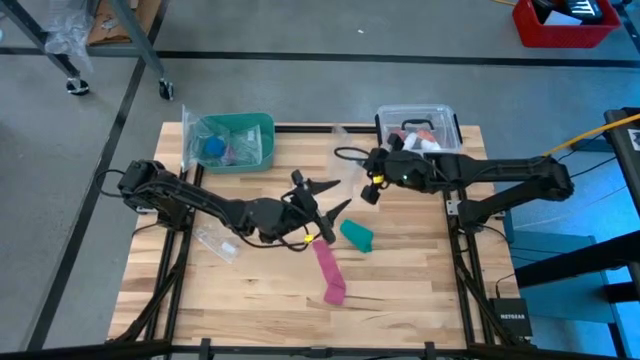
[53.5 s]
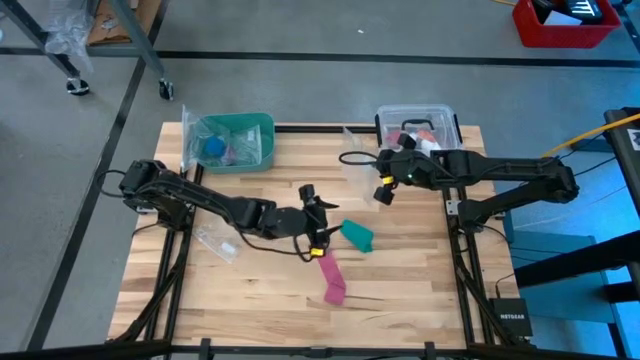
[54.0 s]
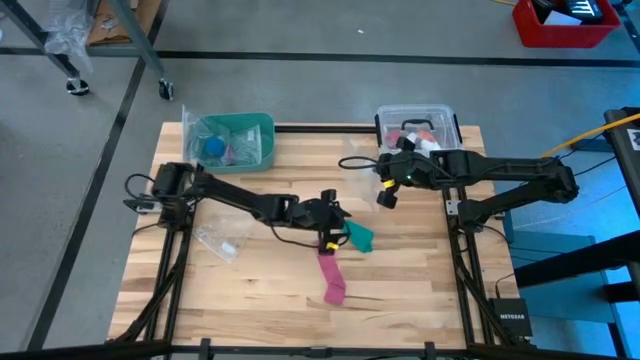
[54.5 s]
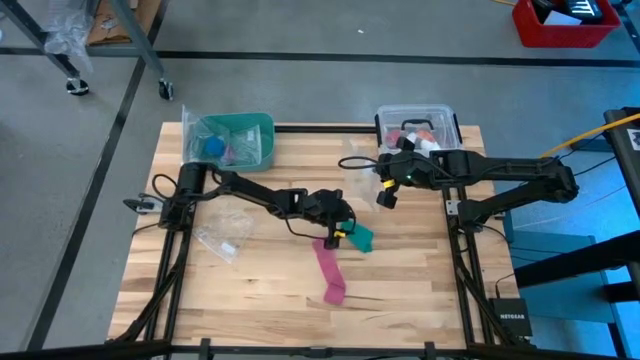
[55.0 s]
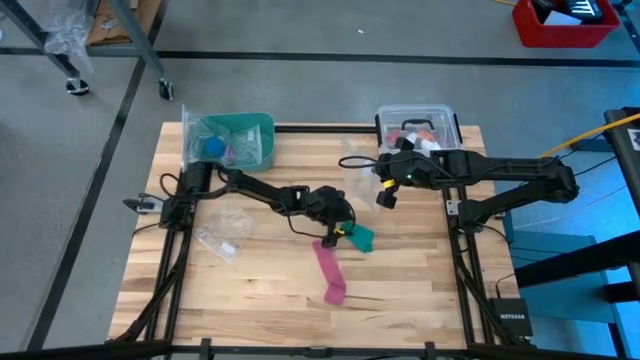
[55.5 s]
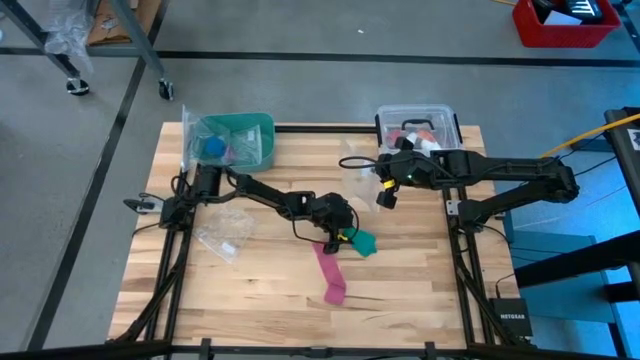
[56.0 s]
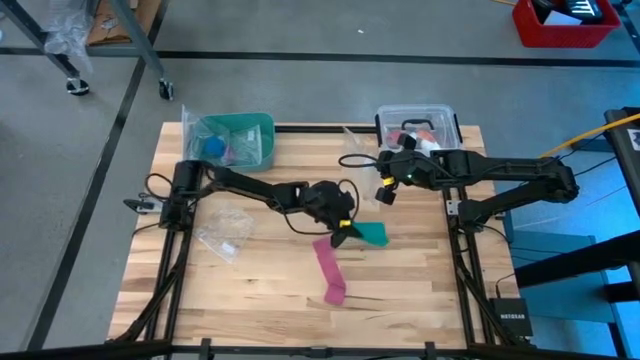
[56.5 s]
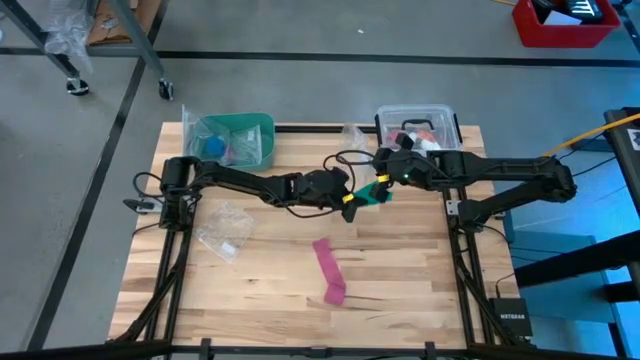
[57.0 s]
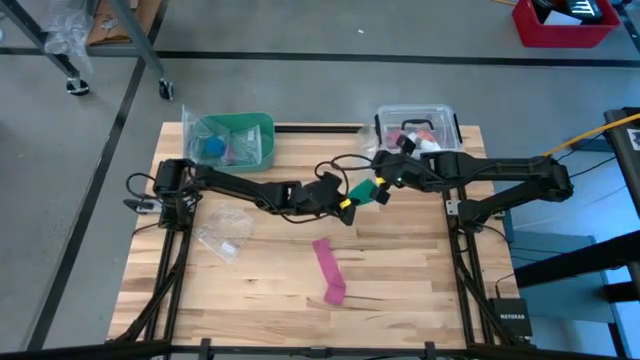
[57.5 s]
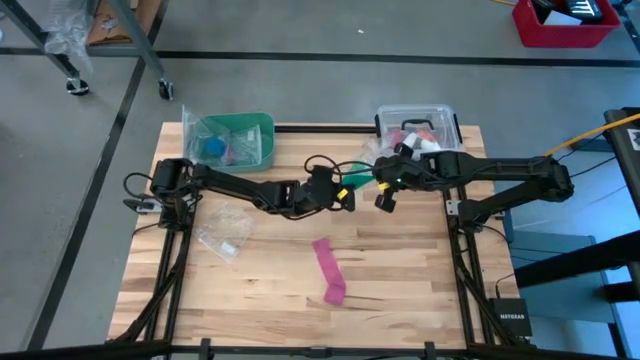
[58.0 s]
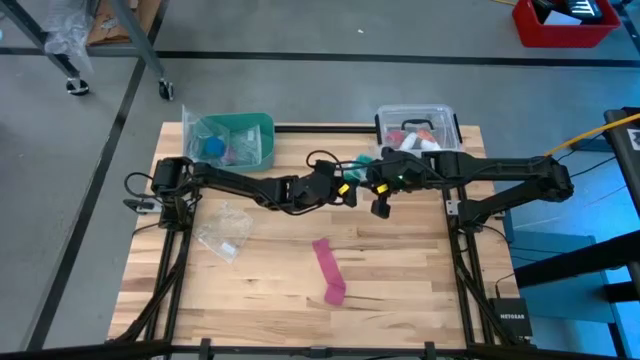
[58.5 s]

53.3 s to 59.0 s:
Task: Roll bandage
Put the green bandage into the transparent zip bag

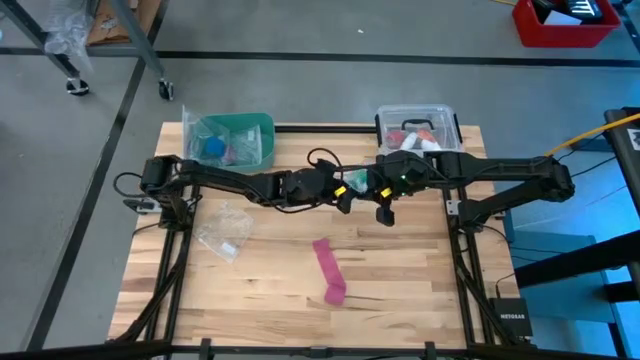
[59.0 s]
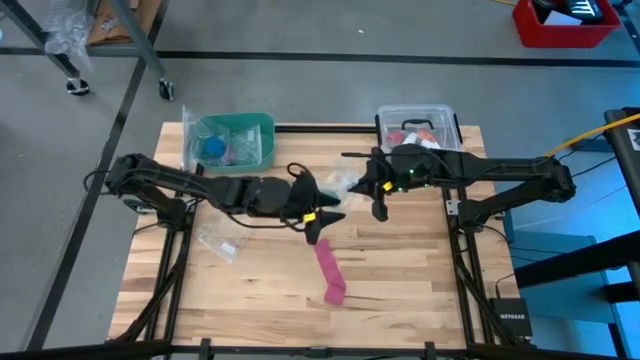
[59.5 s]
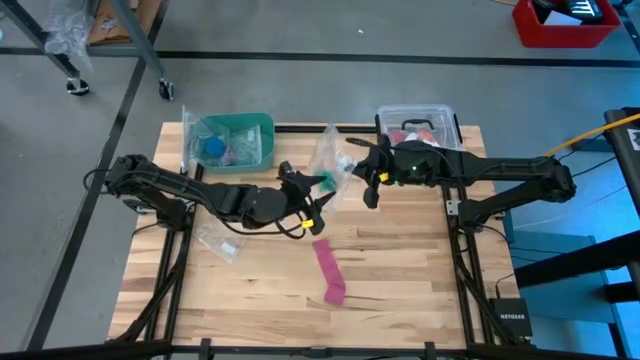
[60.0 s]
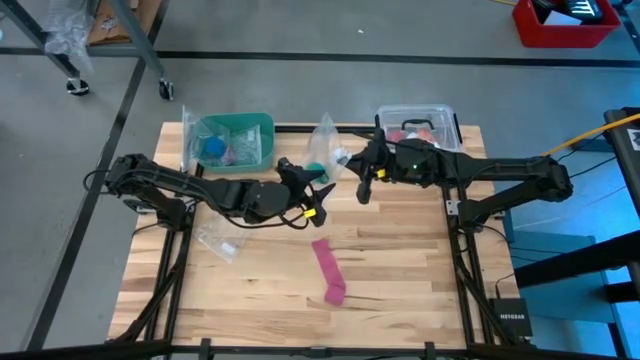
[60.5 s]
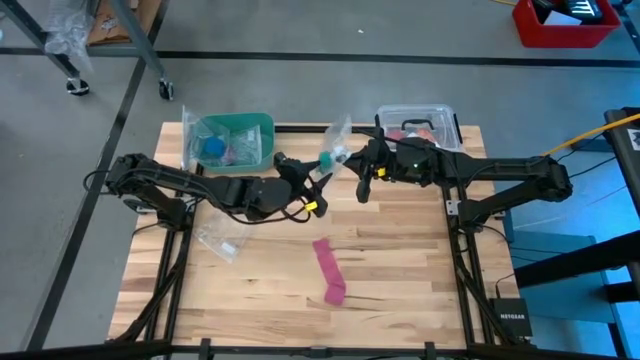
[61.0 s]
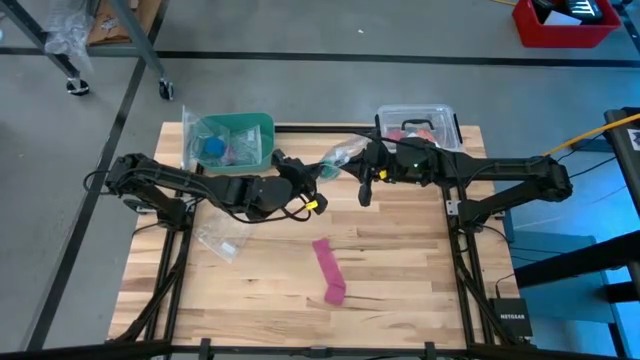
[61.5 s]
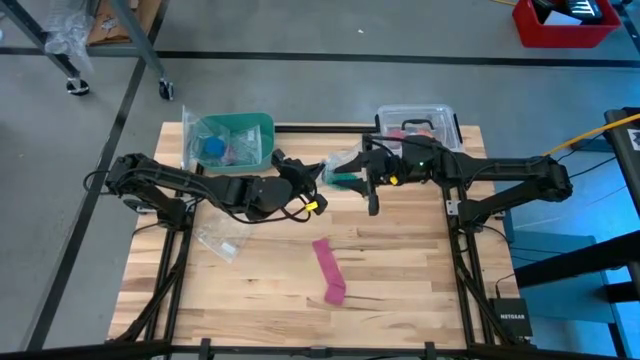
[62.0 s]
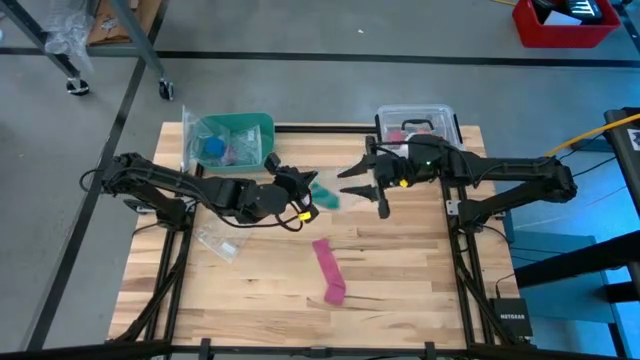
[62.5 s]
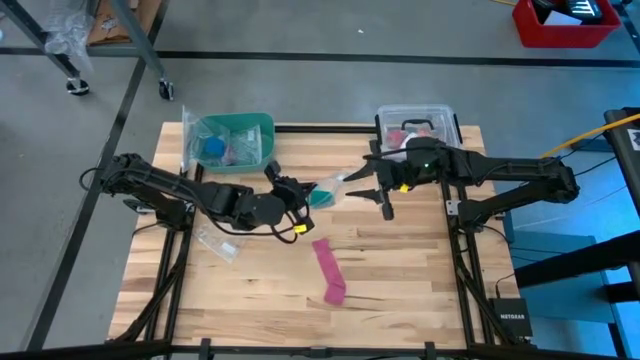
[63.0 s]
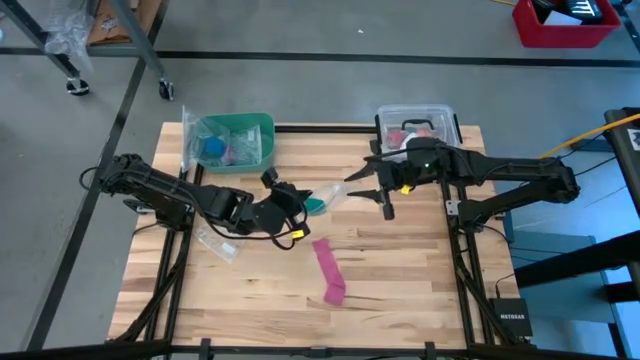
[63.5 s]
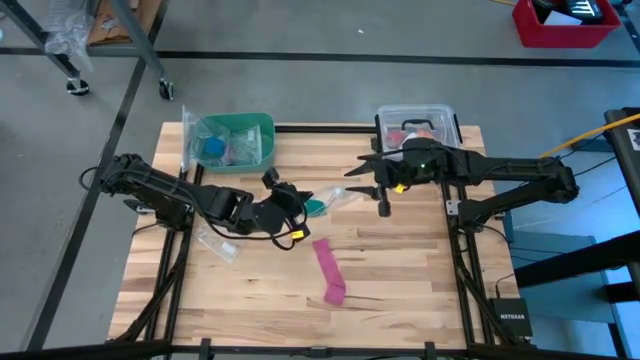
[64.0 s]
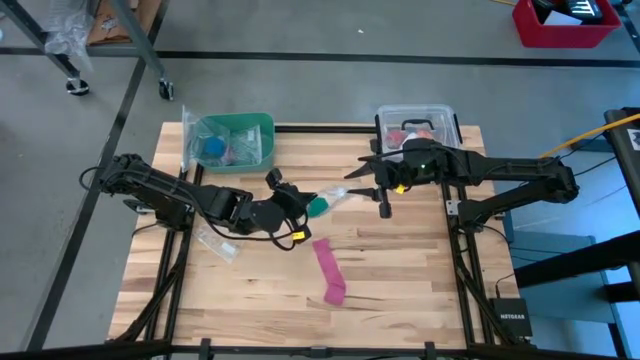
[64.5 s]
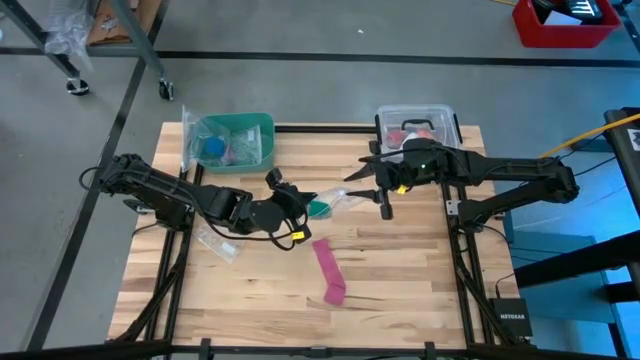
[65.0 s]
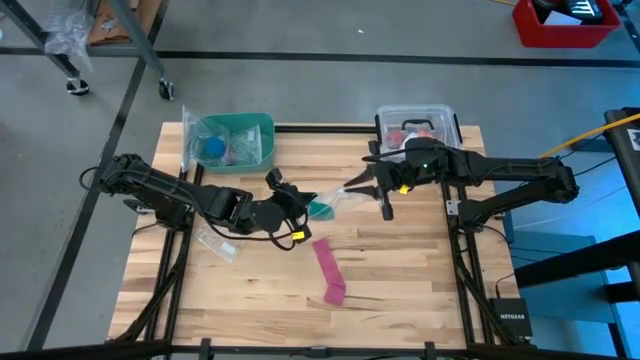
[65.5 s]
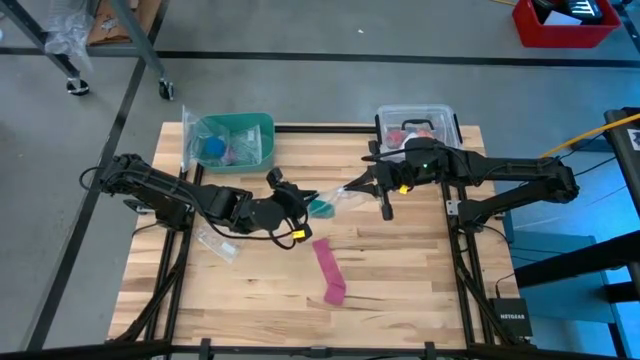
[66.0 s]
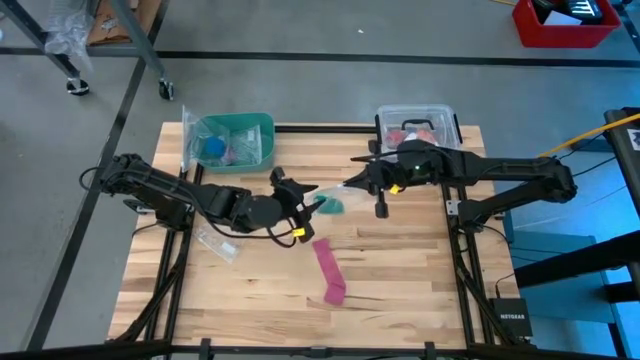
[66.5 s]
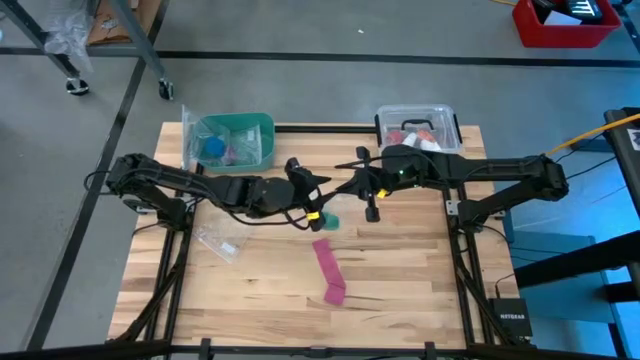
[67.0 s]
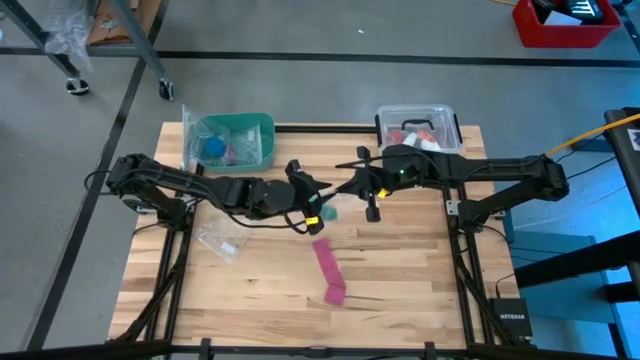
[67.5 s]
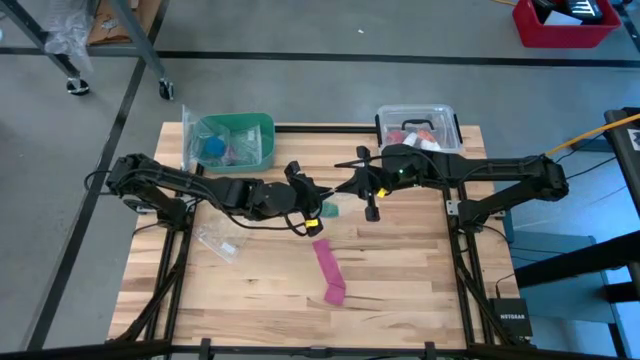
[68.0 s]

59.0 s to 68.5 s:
Close the transparent zip bag

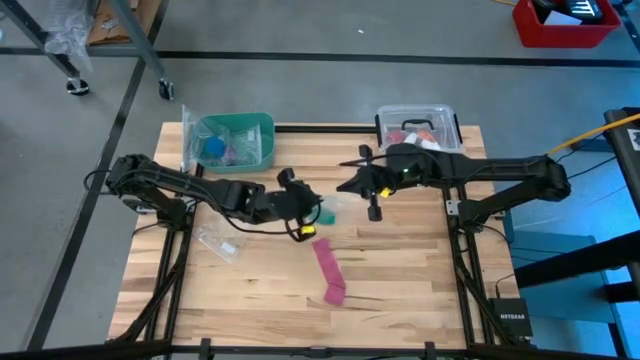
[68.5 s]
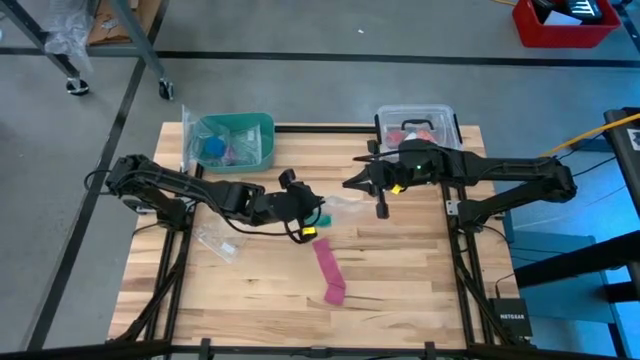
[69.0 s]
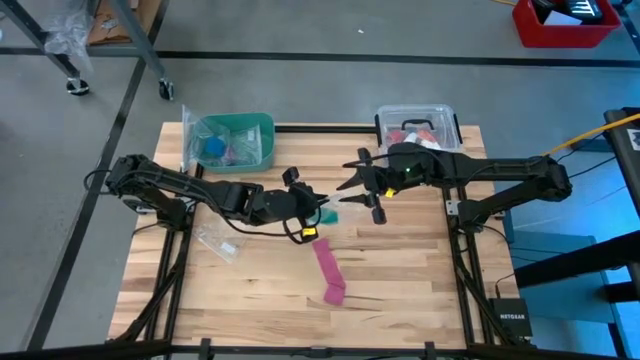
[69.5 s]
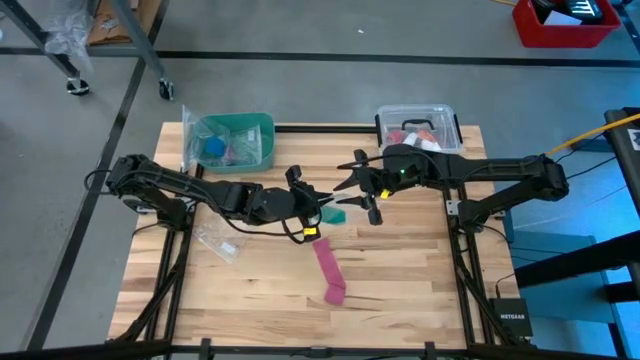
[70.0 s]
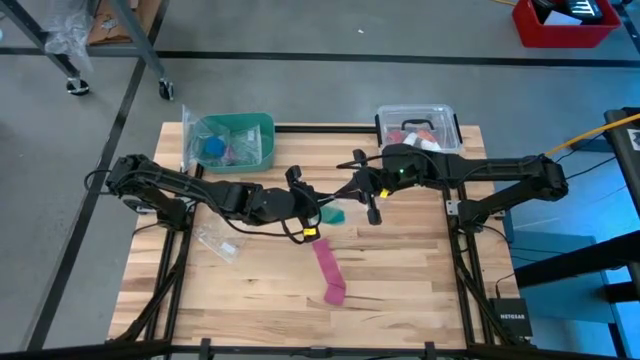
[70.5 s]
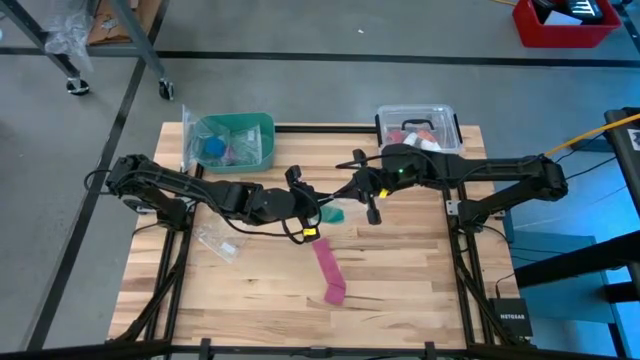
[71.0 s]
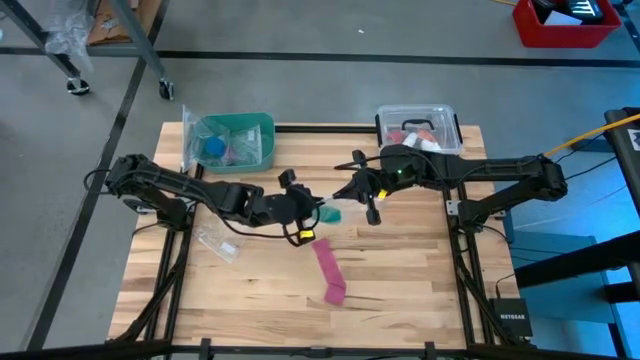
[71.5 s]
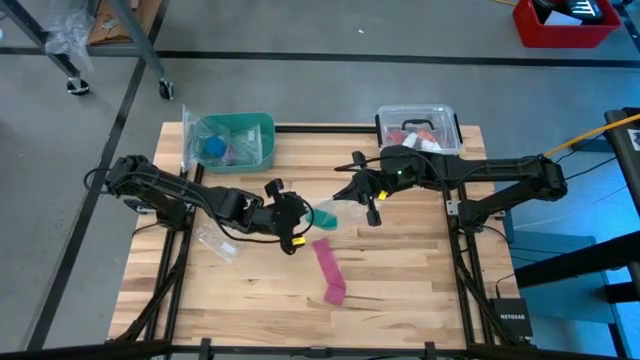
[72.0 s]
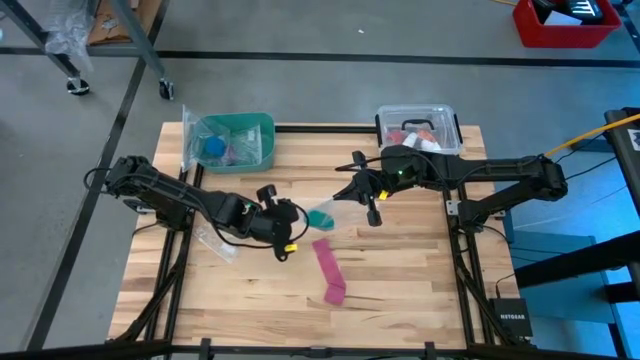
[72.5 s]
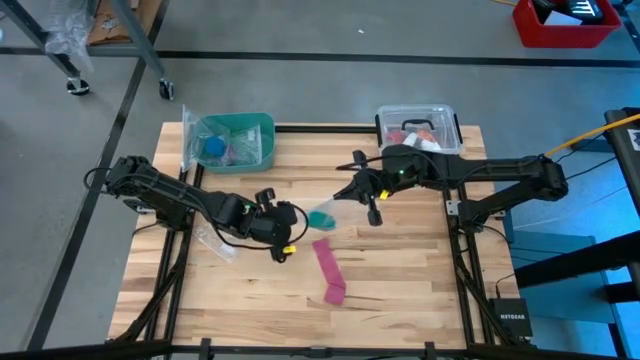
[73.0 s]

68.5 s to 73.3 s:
Close the transparent zip bag

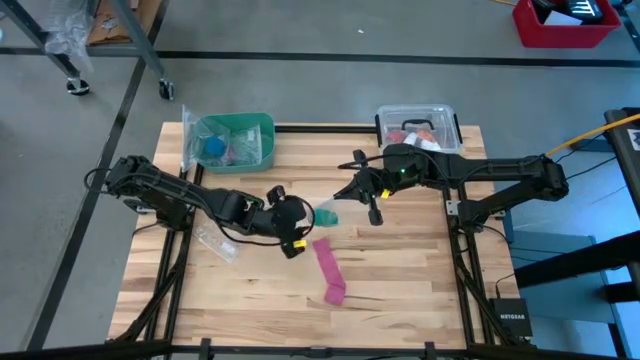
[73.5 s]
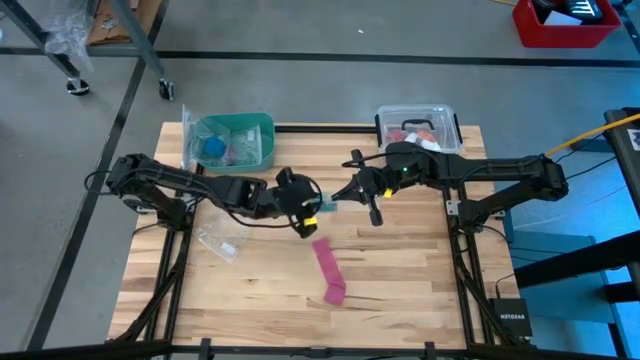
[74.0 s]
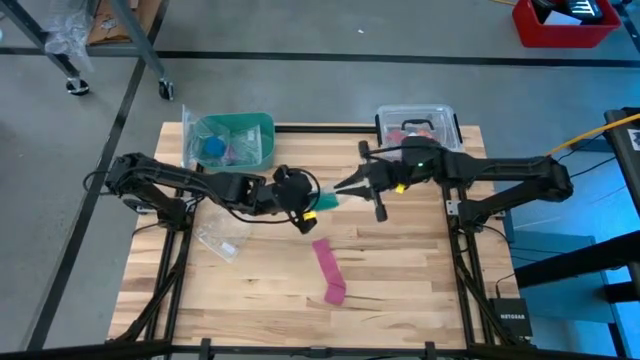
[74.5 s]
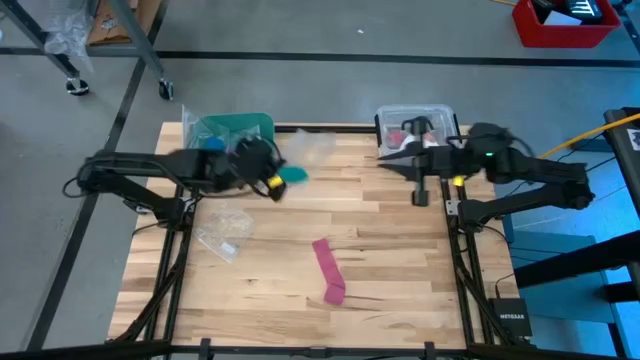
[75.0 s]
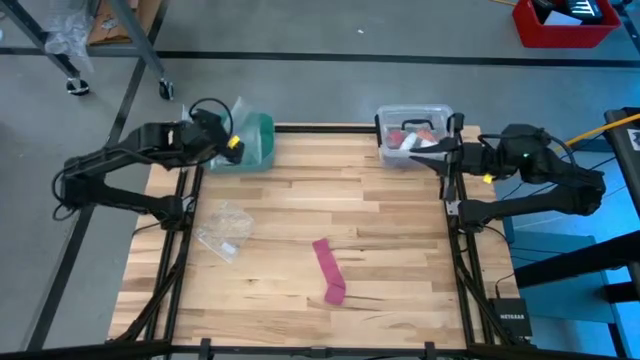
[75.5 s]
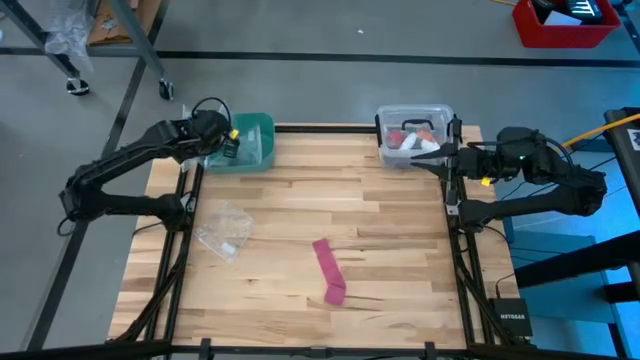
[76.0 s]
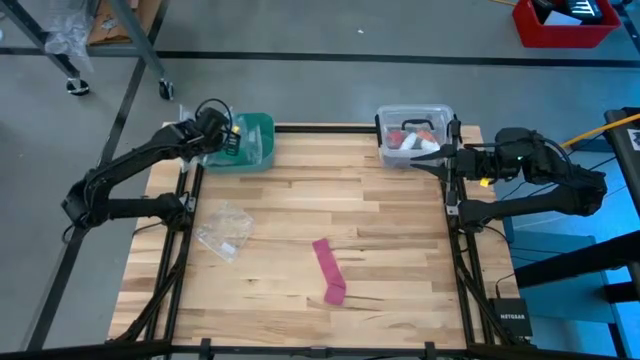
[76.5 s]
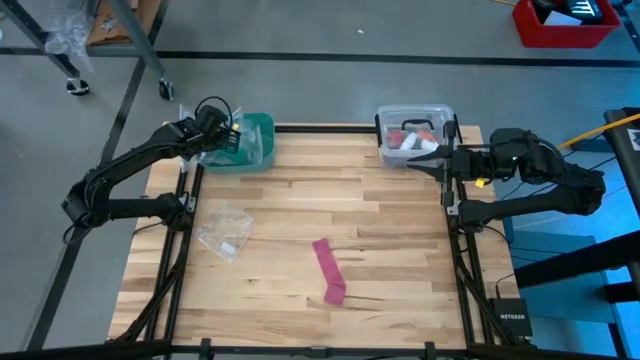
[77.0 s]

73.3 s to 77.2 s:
Put the transparent zip bag into the green bin
